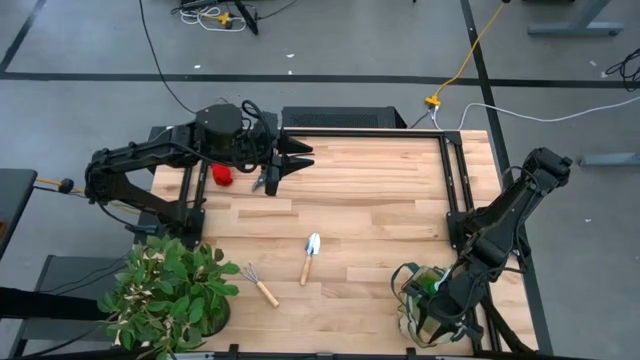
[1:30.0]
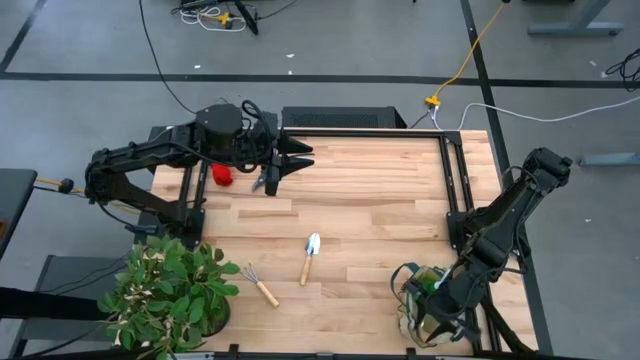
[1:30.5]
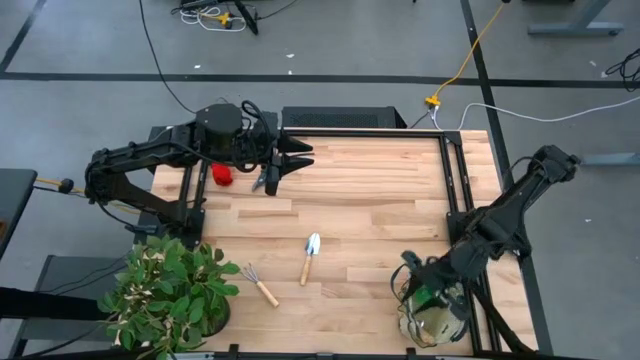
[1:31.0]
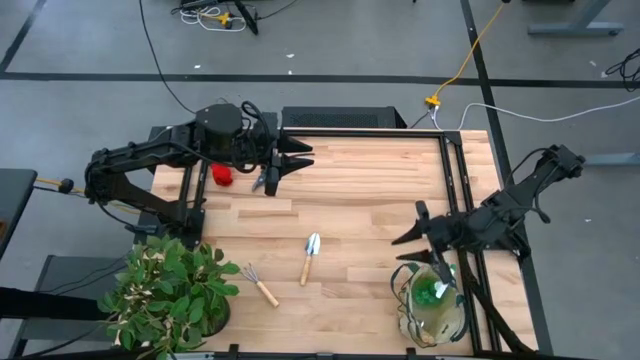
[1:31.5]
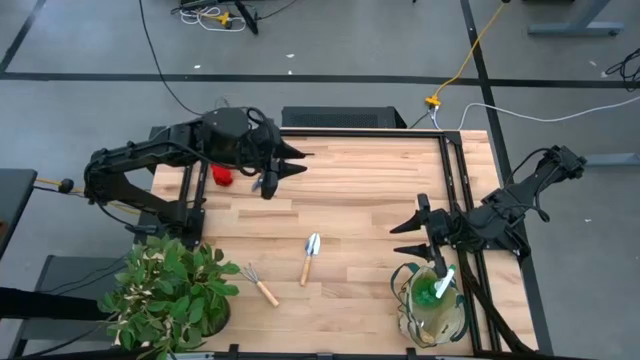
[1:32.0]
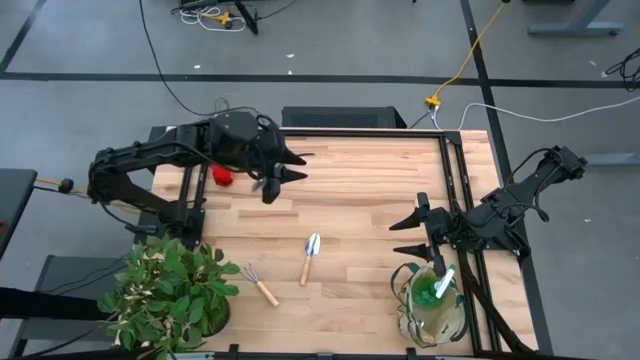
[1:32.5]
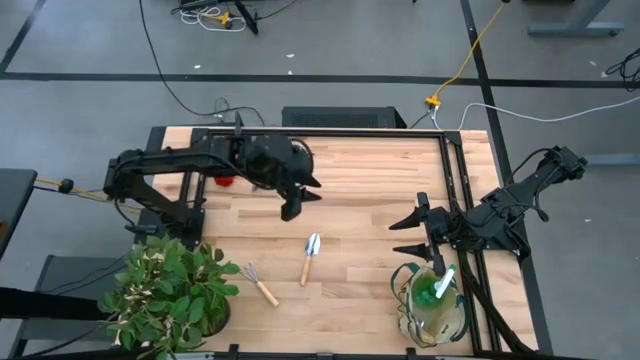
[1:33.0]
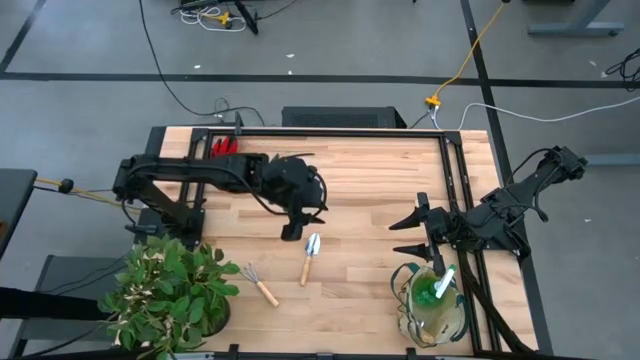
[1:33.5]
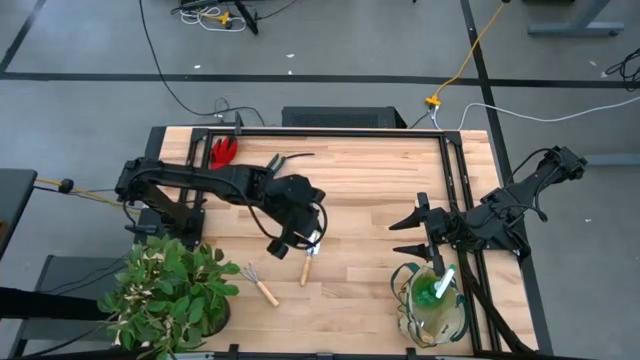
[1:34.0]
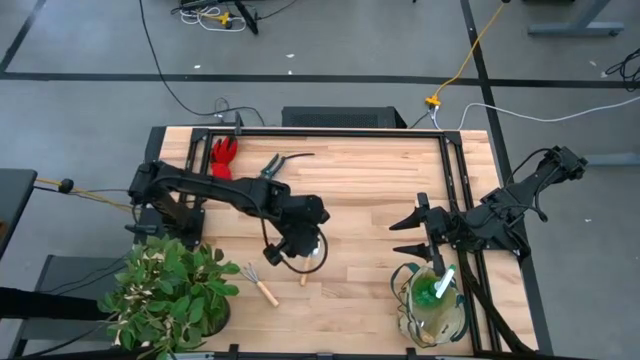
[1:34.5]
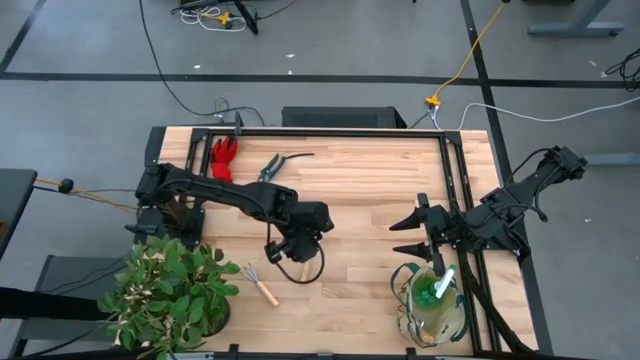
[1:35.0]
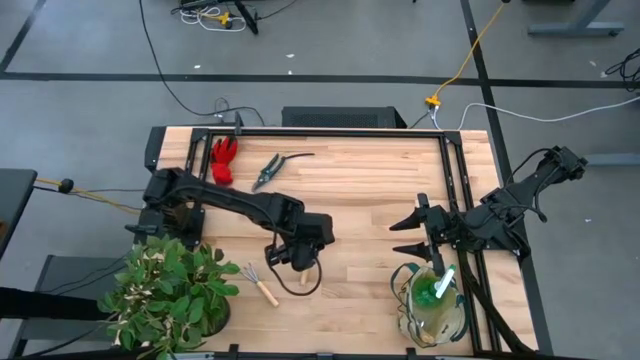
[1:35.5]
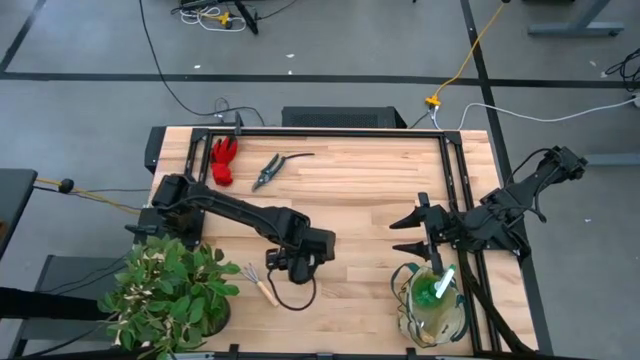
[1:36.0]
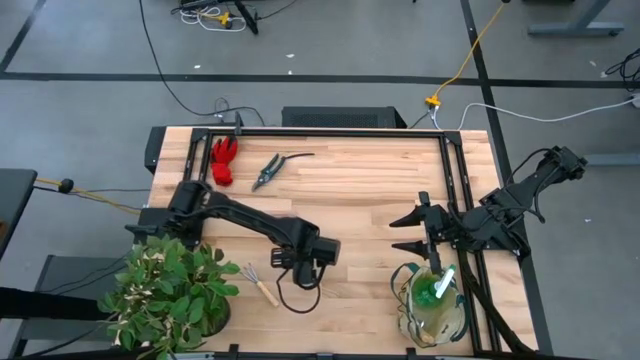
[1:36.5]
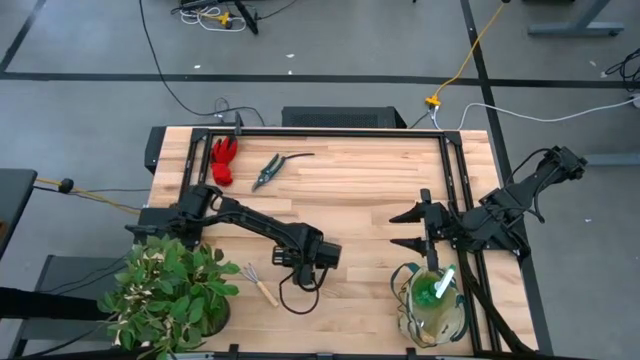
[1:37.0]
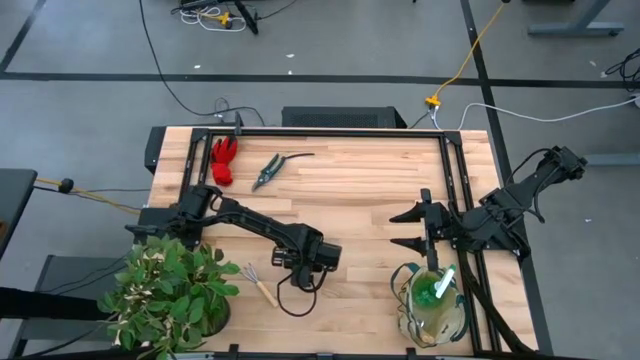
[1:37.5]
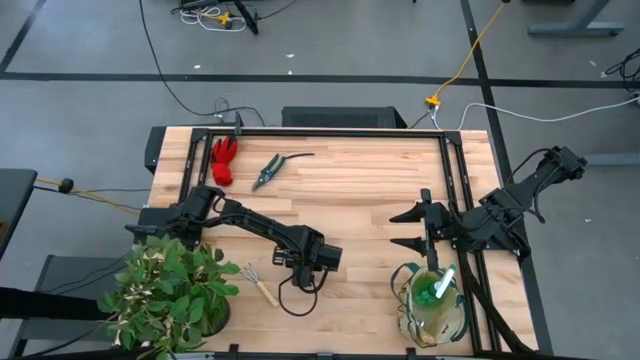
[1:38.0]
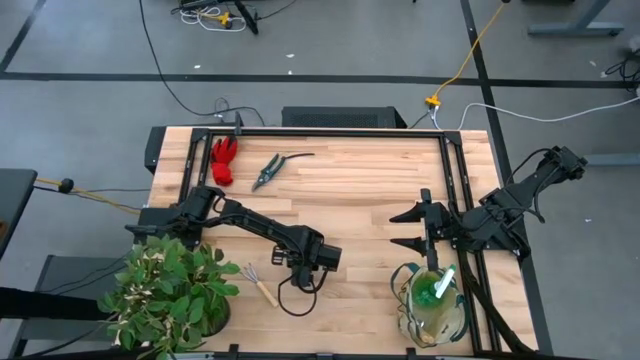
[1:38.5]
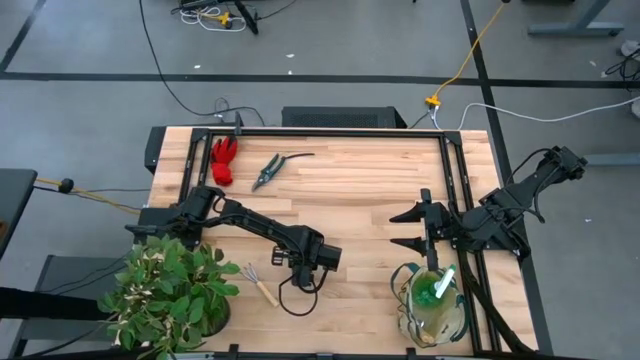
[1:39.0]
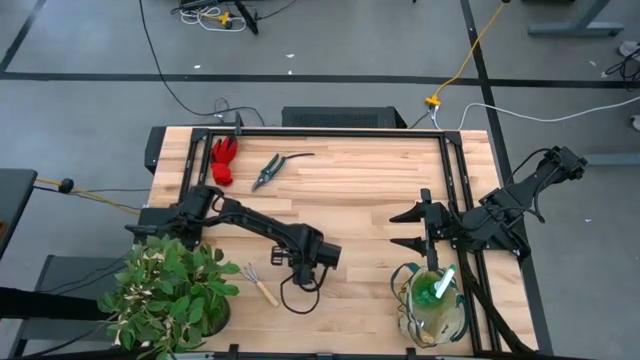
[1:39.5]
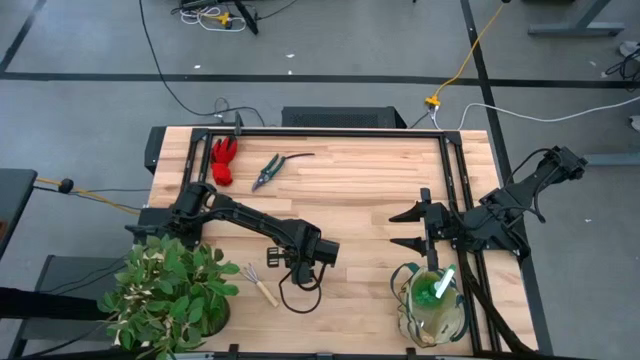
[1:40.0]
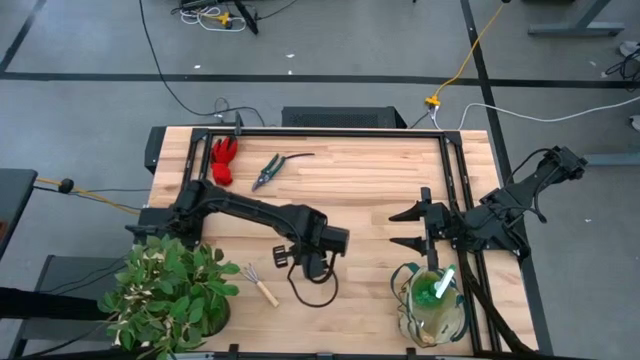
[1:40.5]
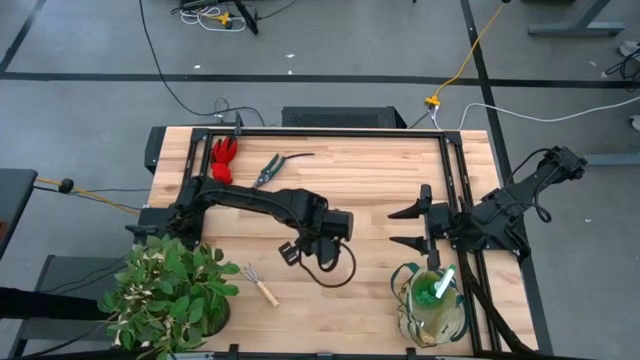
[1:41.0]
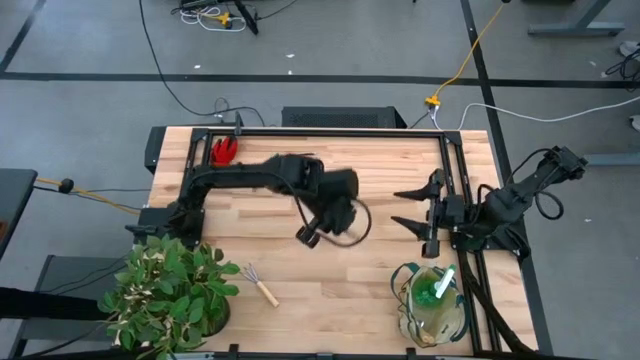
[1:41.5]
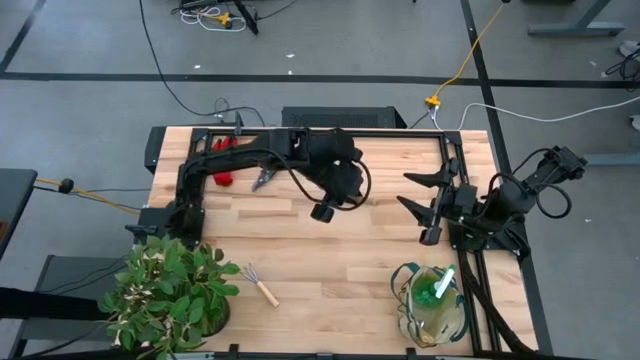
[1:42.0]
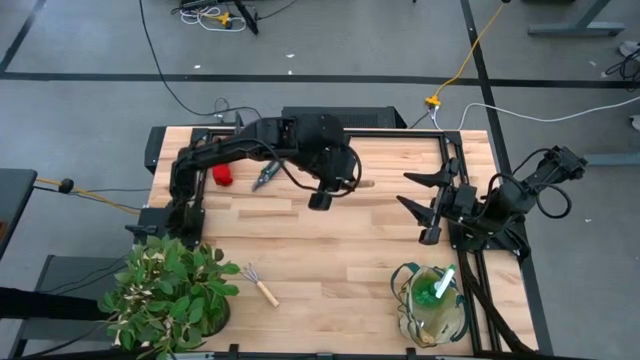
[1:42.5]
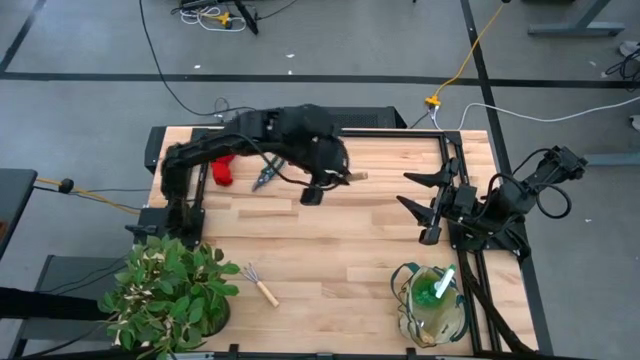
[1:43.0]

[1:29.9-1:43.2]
Task: Pick & Place Garden tools in Gardening bag
Put the brown trowel into the white gardening bag

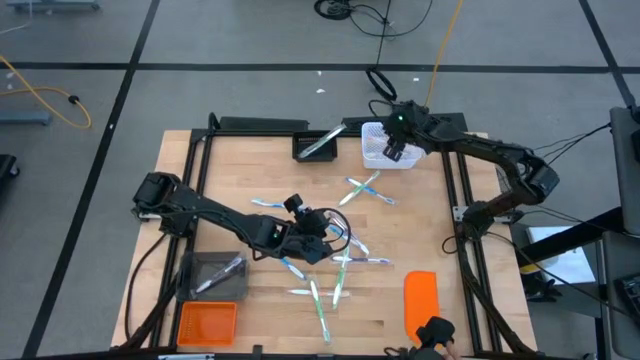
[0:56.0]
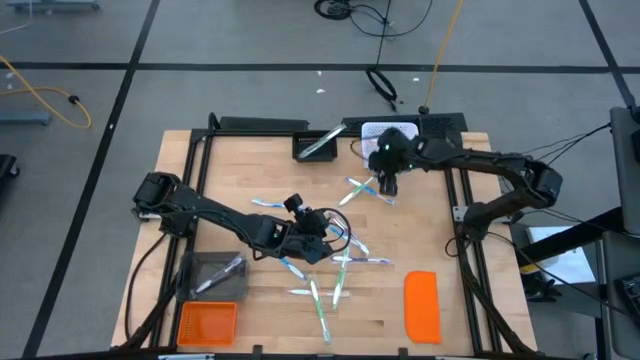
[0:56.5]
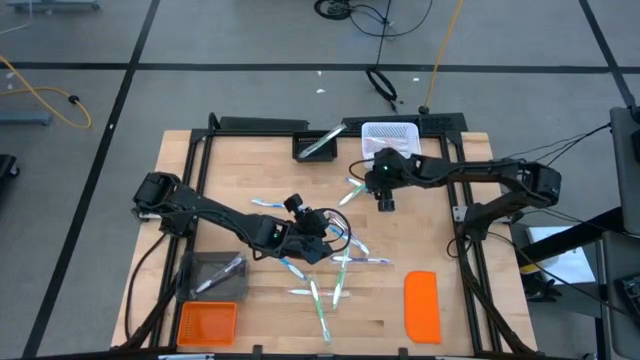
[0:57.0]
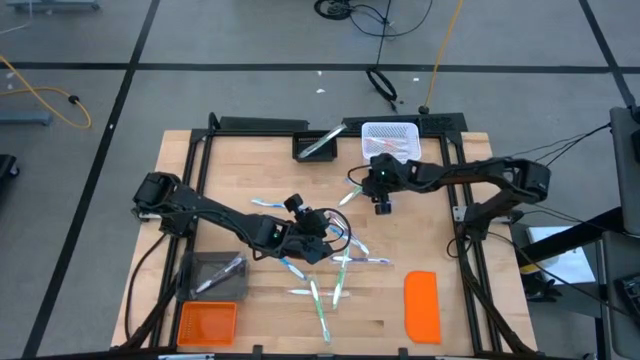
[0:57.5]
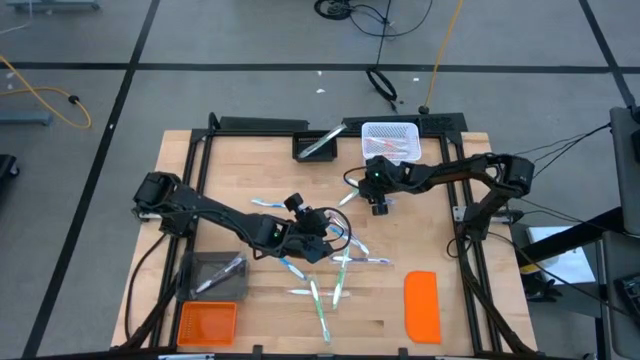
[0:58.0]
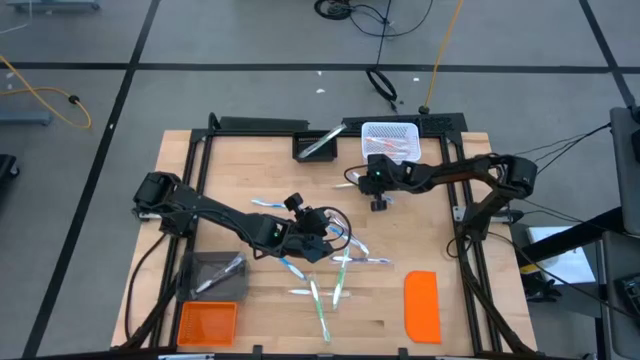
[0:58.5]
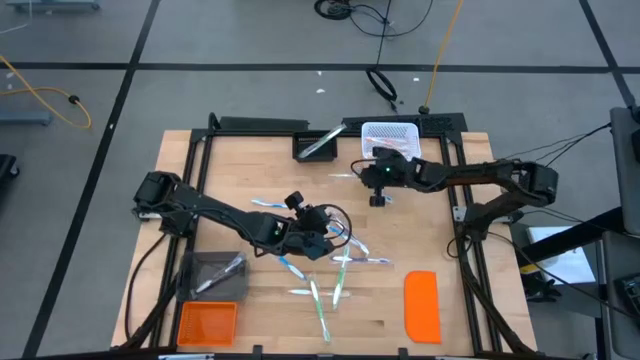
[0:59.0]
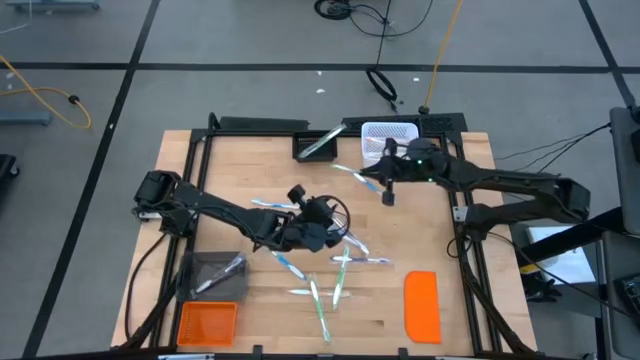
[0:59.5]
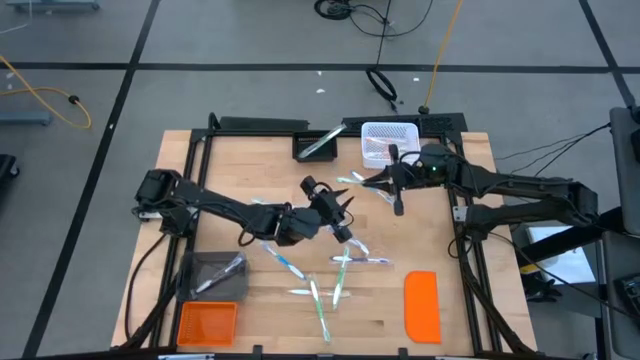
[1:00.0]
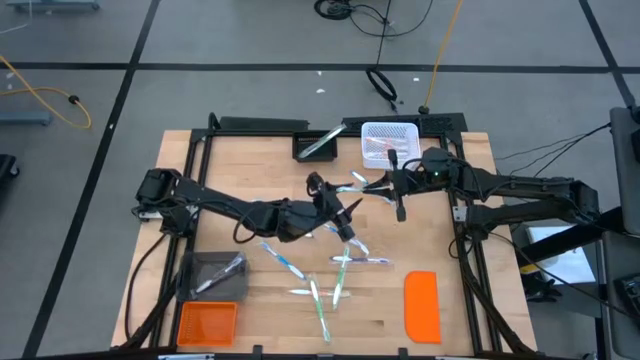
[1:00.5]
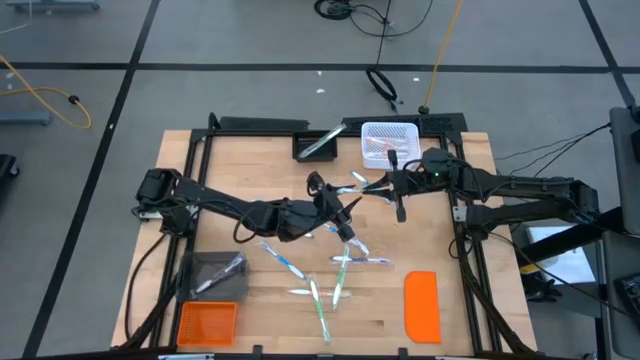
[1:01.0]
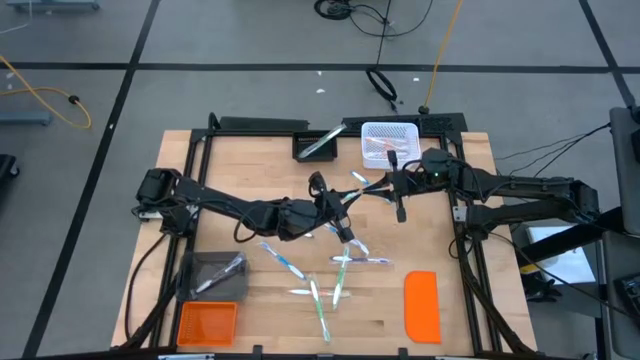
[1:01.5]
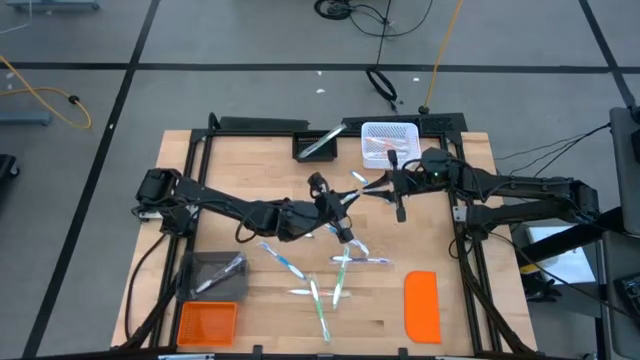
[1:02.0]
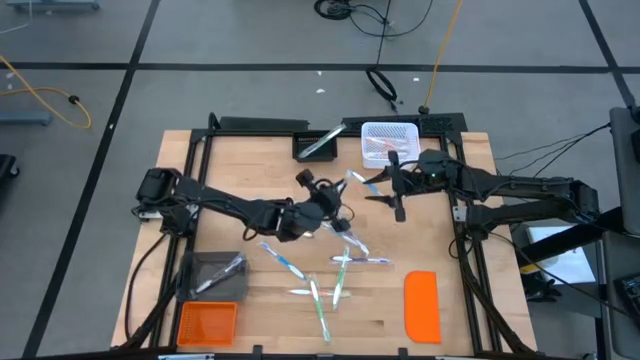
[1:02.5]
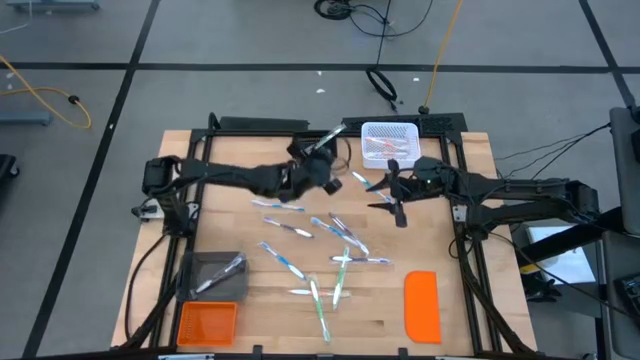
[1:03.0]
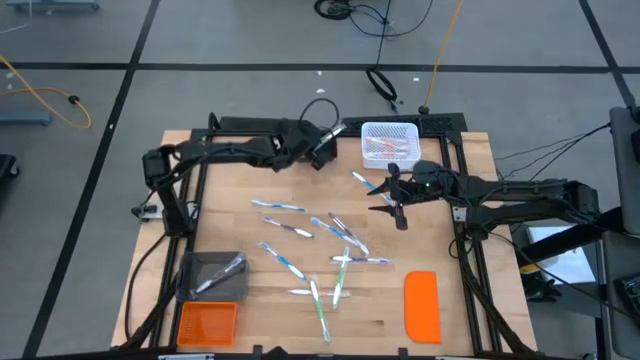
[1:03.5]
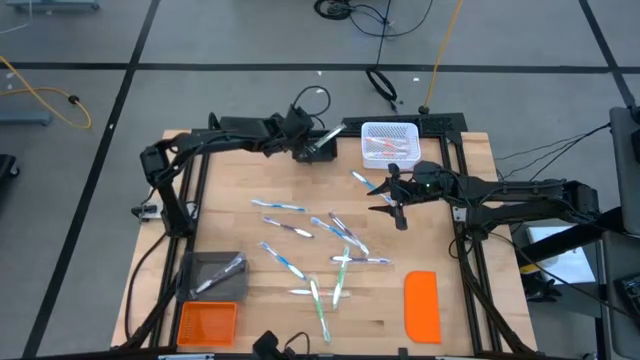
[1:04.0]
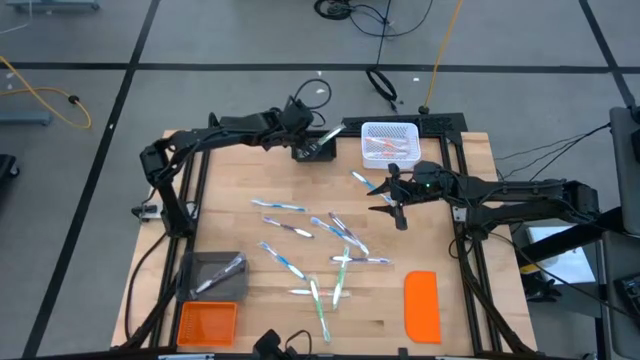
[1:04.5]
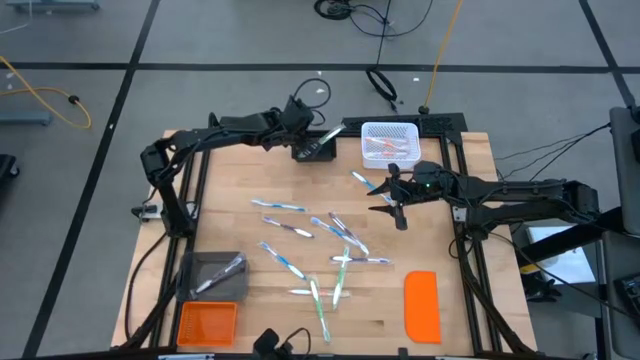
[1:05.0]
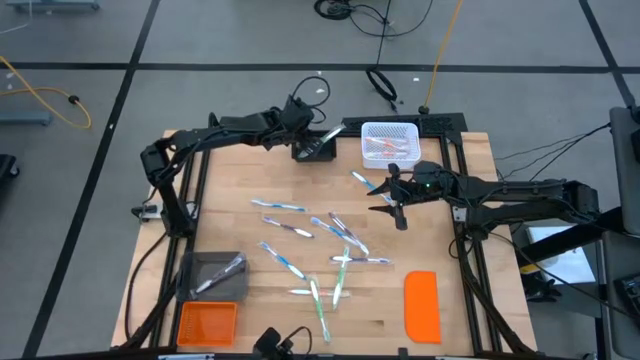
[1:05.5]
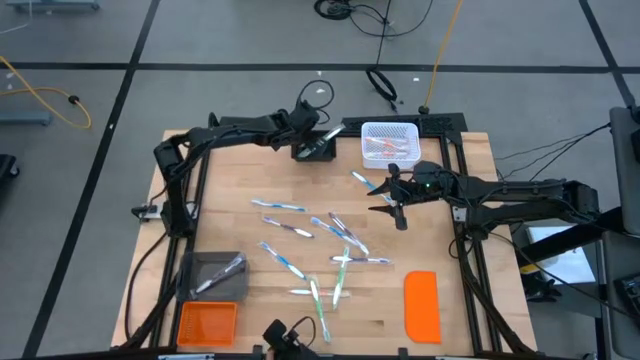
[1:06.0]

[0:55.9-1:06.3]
Task: Pick & Place Toothbrushes
Put the green toothbrush into the black bin
